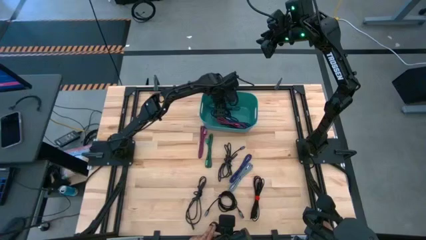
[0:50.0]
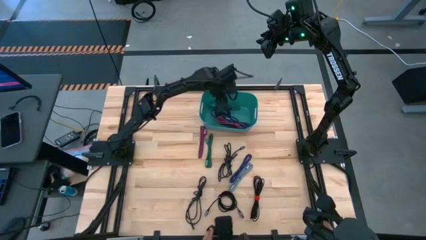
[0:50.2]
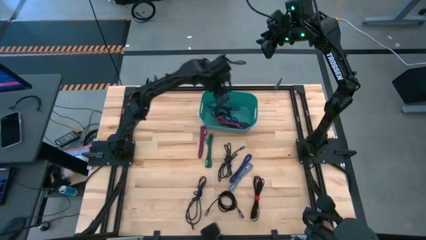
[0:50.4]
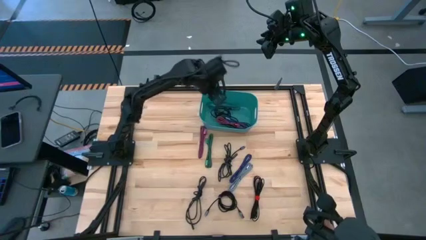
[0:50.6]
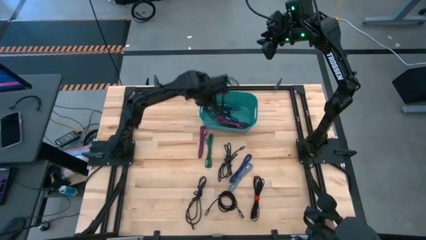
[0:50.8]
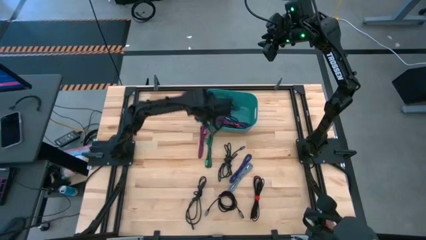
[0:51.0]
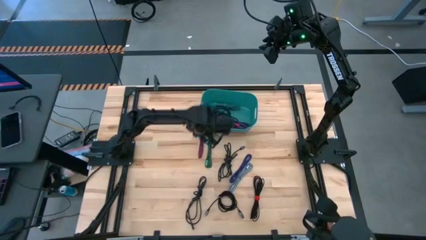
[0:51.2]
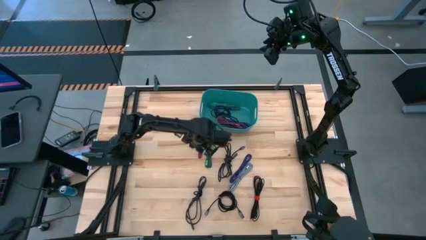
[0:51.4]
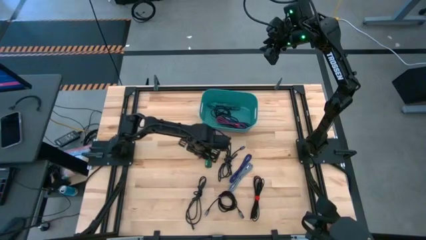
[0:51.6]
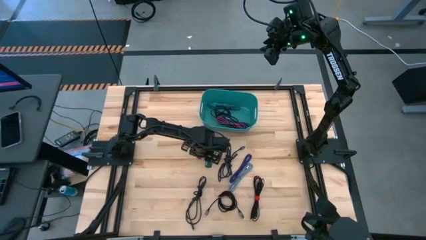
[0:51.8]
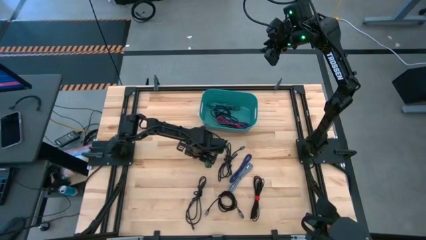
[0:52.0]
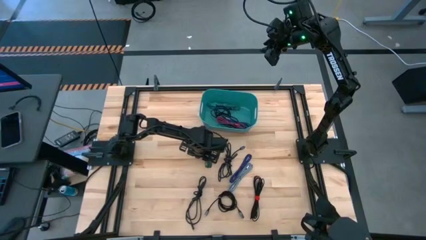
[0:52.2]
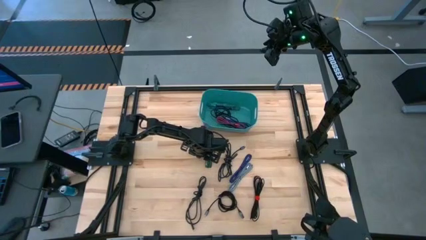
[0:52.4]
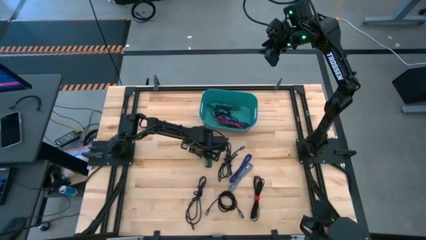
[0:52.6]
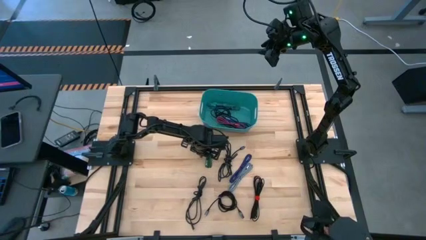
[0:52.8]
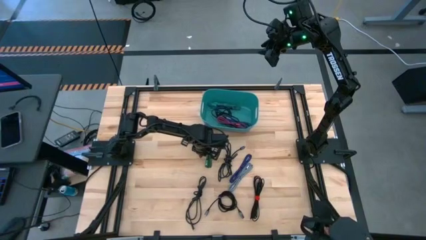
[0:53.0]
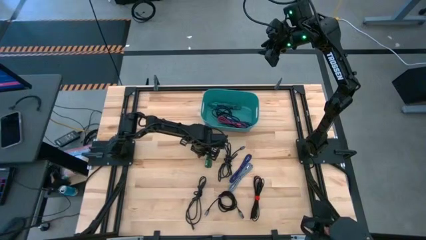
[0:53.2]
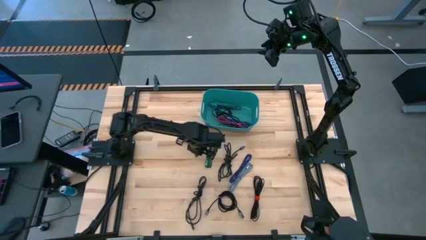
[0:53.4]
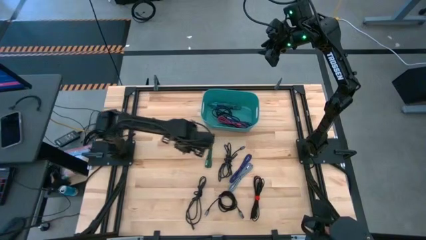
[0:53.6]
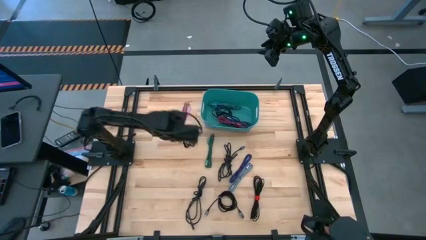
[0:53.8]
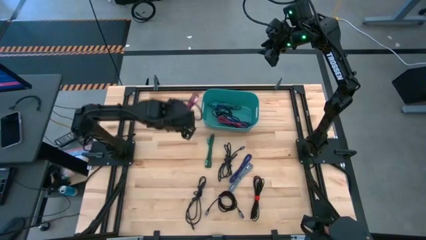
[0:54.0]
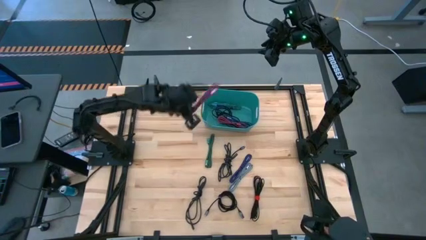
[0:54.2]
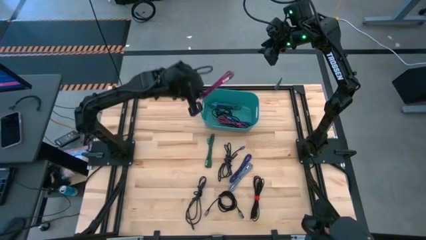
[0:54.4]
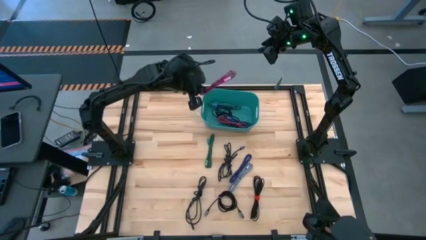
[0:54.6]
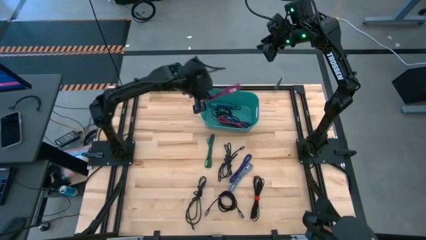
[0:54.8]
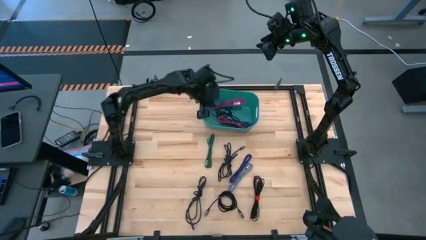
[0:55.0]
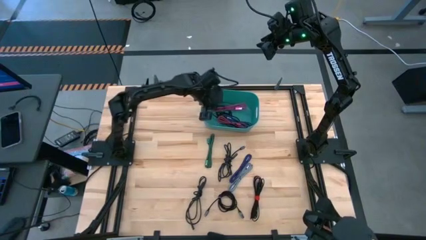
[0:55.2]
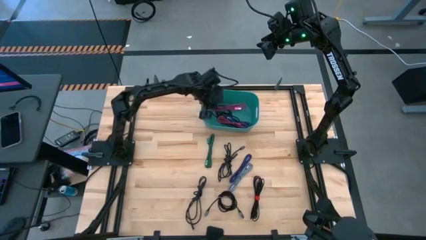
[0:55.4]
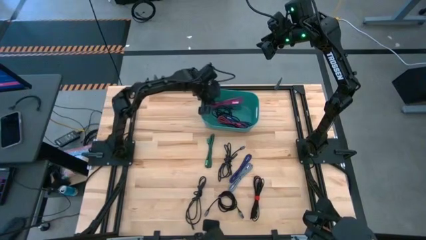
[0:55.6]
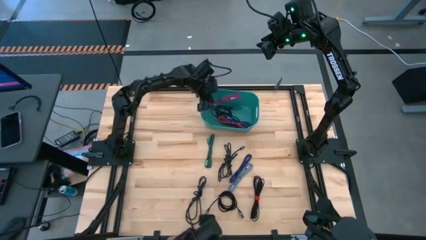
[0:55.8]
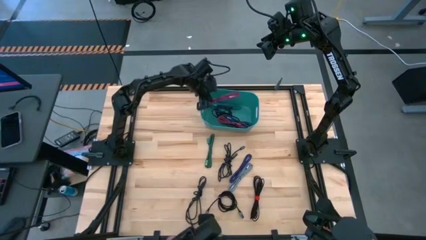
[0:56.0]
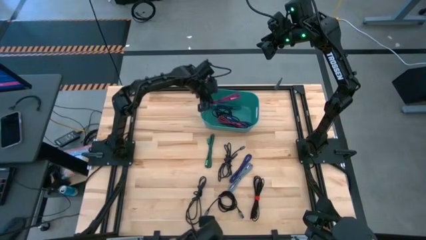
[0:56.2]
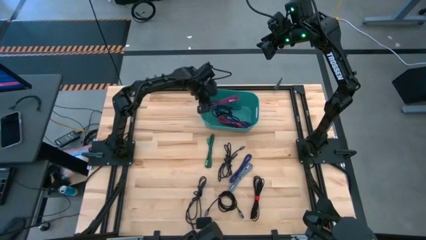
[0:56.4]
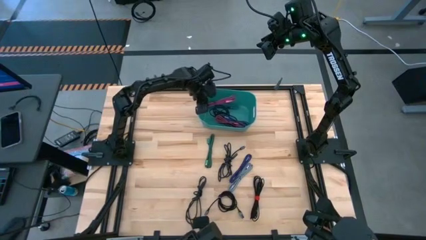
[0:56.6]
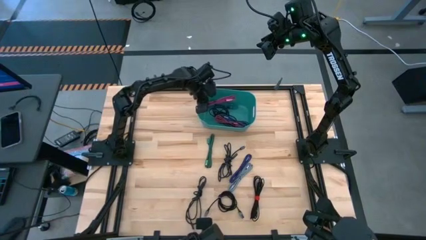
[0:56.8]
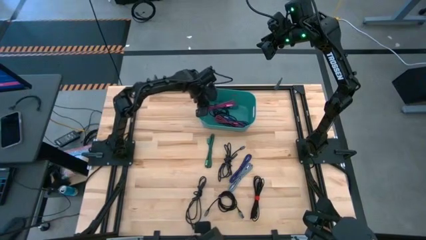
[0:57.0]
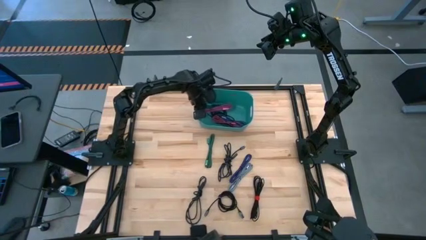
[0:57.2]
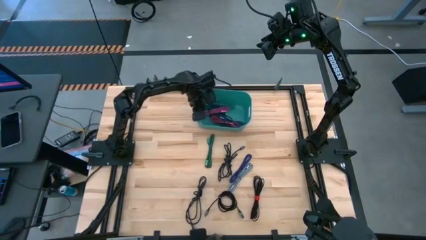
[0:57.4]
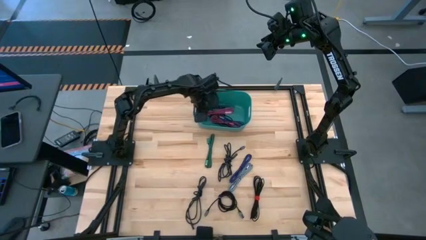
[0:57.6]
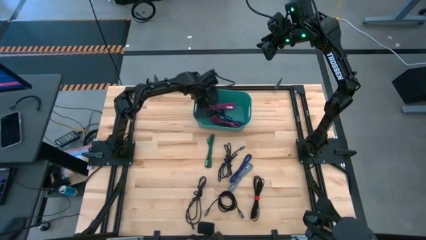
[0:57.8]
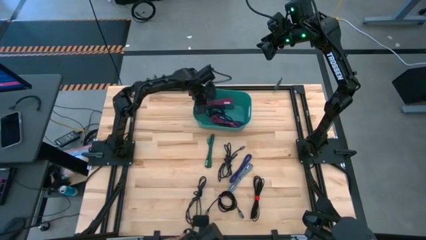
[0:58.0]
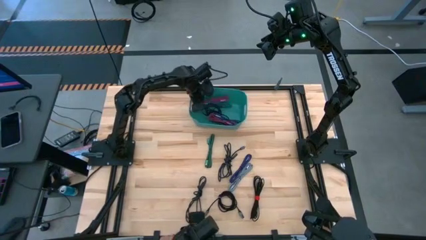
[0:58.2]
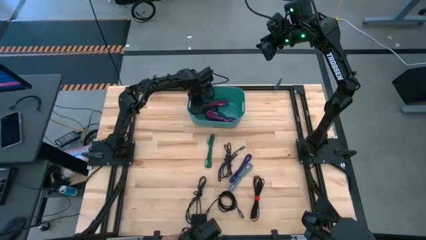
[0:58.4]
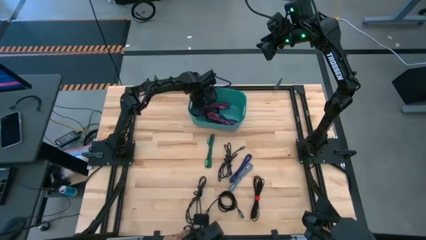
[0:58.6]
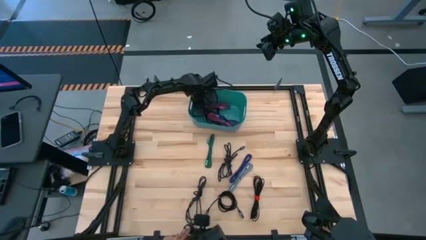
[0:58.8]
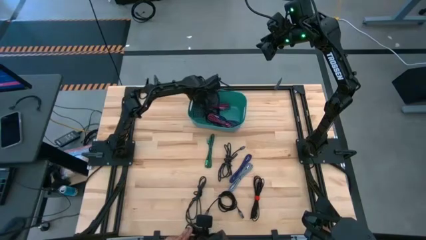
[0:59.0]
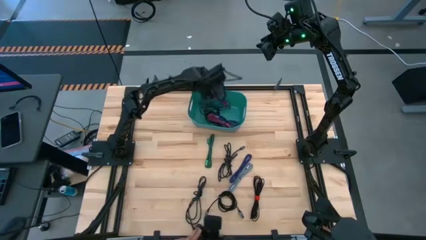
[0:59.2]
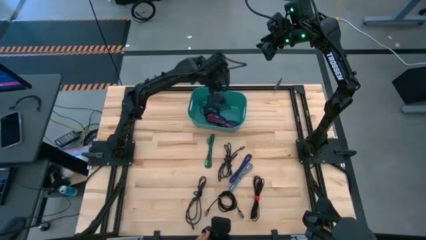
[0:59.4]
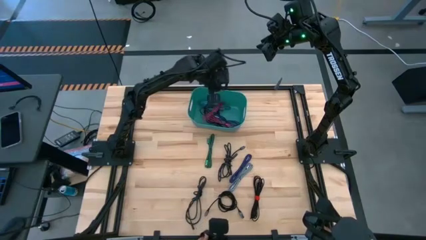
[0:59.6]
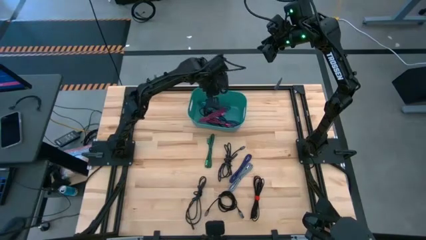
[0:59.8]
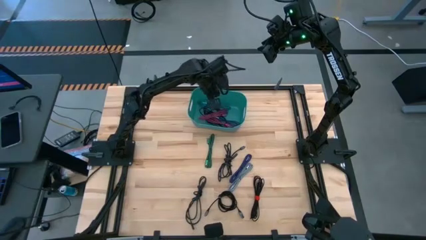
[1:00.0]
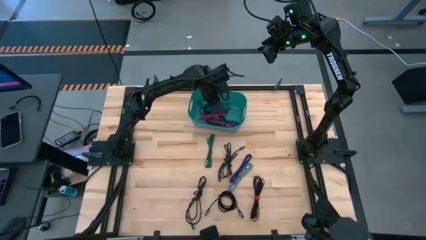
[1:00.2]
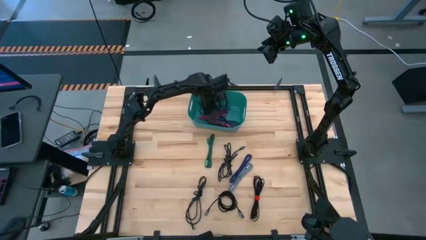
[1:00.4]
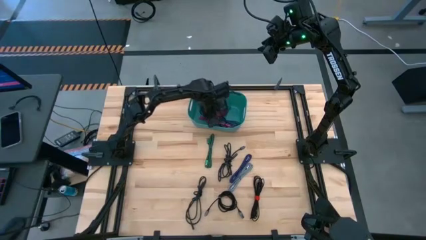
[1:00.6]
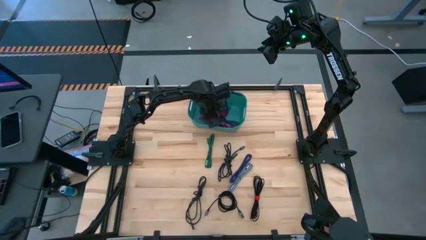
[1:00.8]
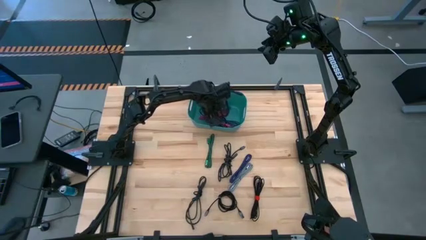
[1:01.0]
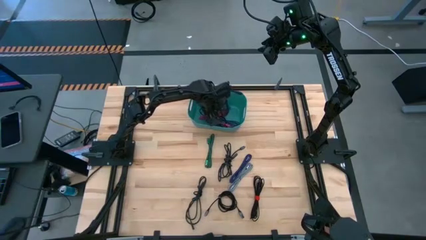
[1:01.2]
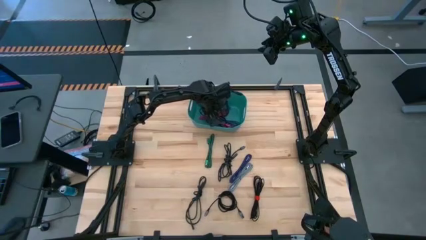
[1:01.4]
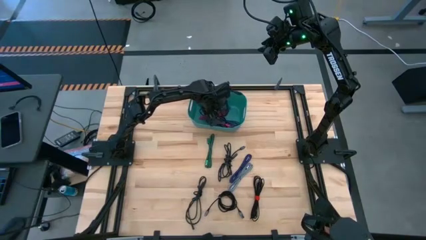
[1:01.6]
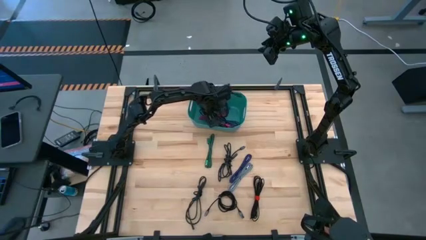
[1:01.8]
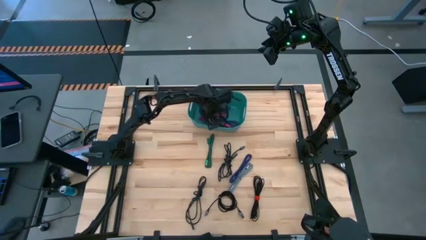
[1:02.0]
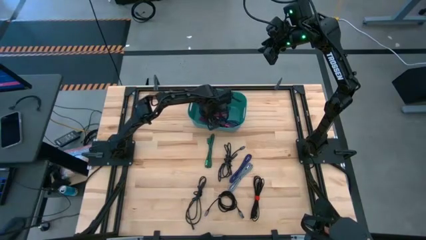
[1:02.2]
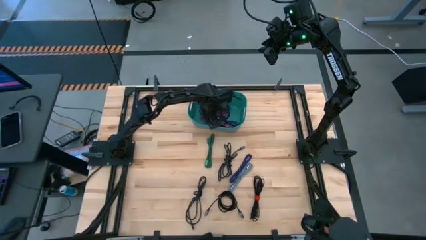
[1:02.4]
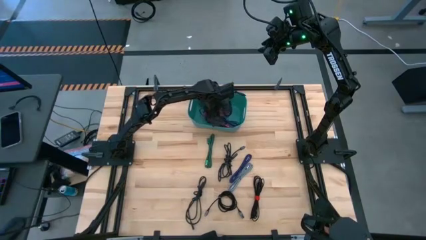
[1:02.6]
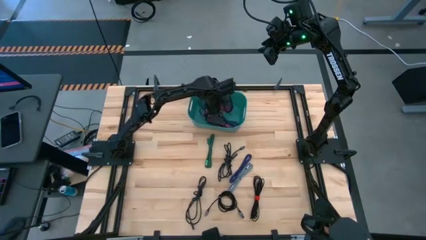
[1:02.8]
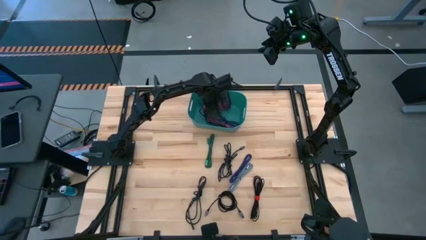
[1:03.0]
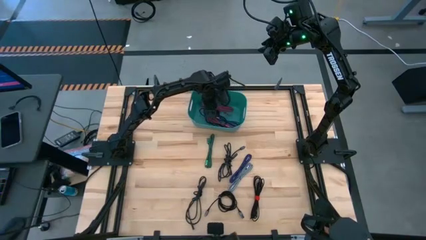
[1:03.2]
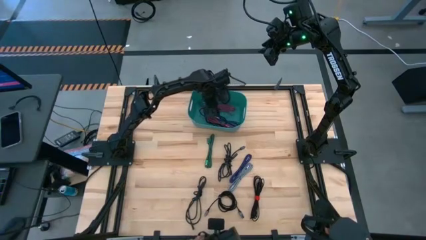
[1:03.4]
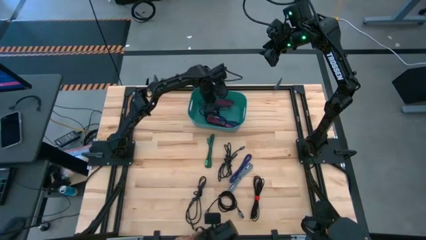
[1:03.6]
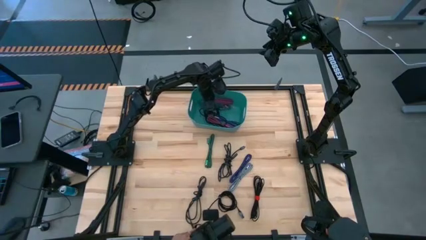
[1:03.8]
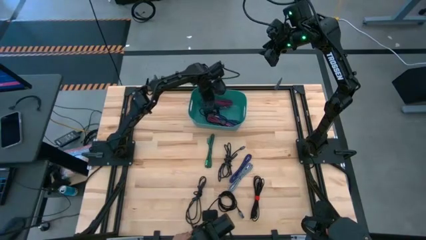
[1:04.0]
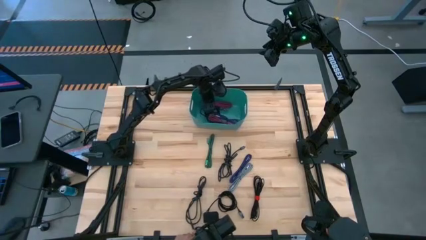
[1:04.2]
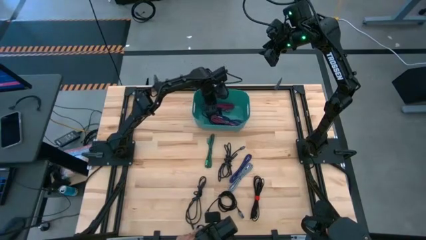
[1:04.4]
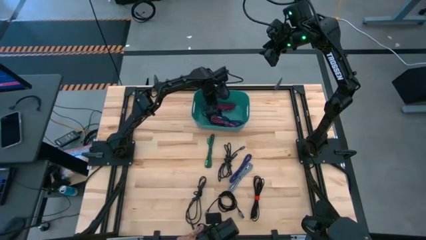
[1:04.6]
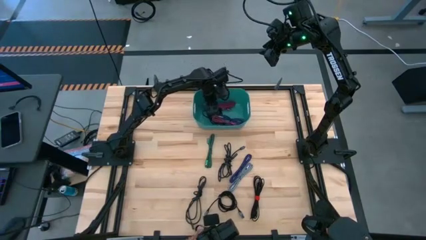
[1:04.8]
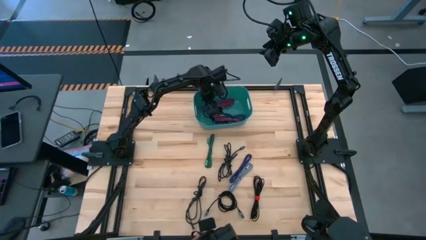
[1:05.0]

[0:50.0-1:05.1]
Task: Pick and place USB-C Cables
Put the pink charger cable into the light blue bin
